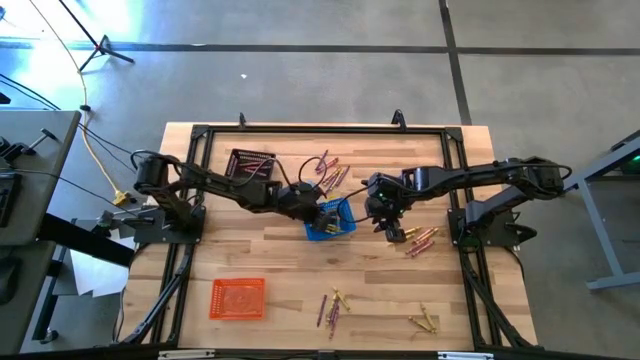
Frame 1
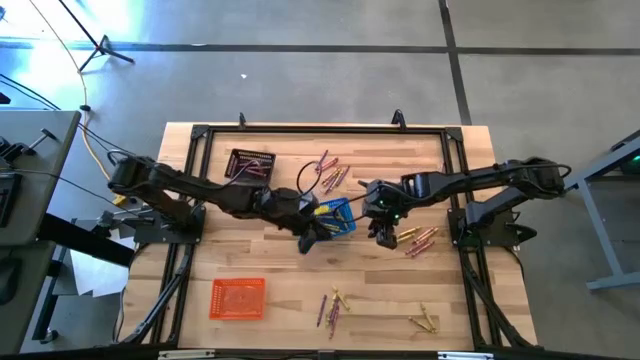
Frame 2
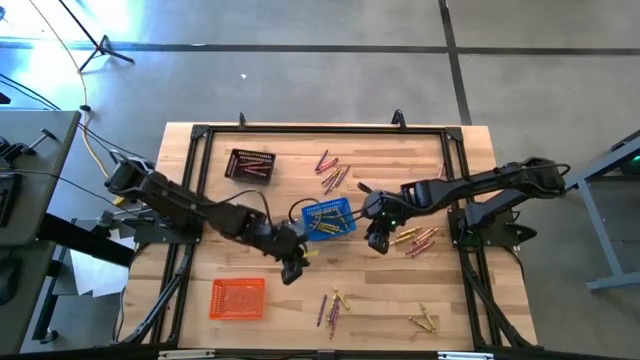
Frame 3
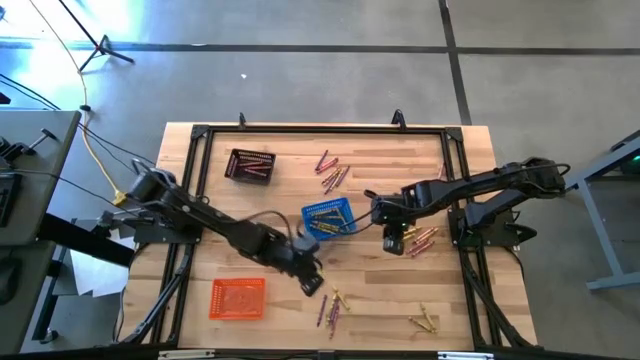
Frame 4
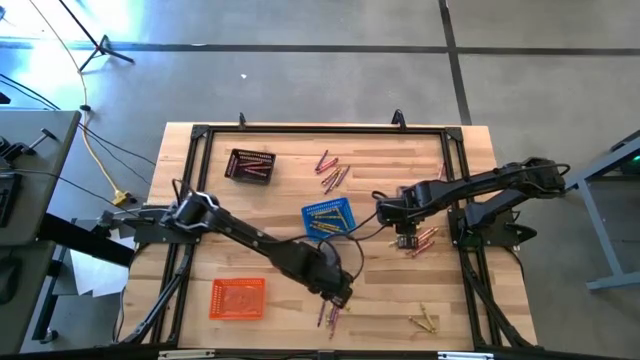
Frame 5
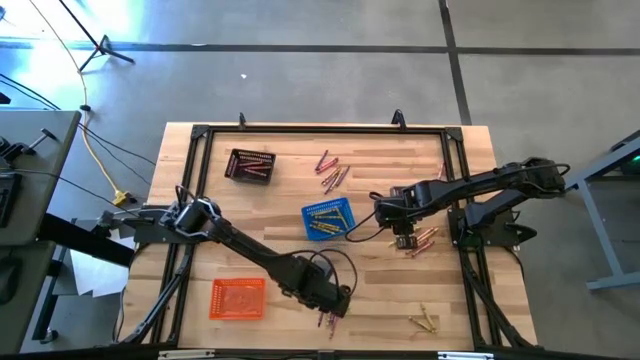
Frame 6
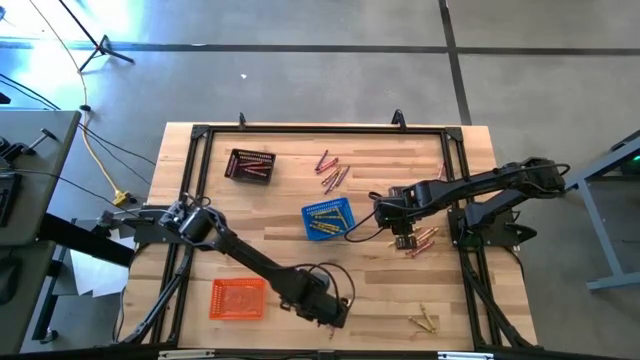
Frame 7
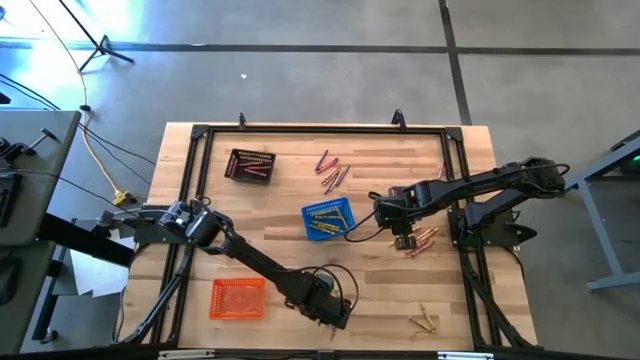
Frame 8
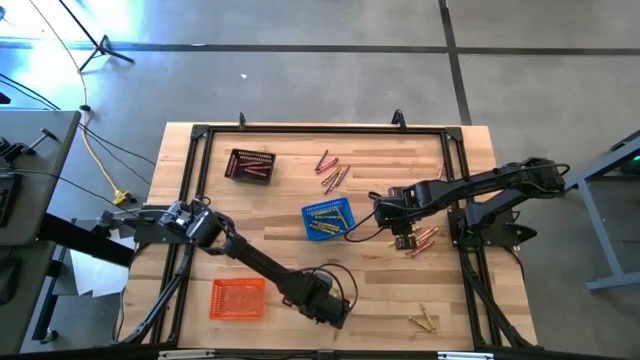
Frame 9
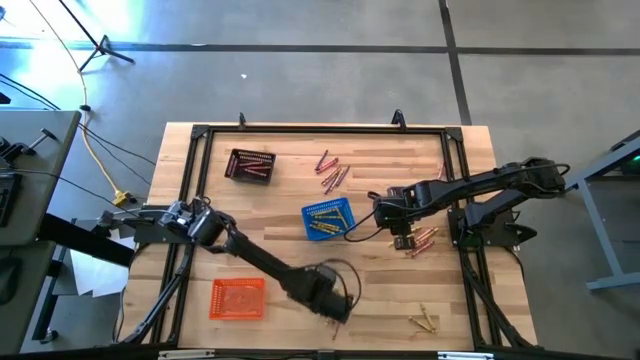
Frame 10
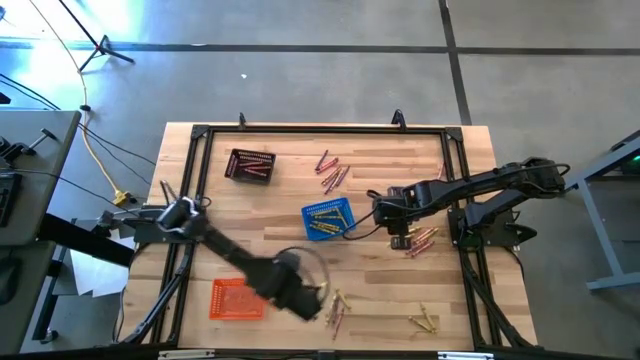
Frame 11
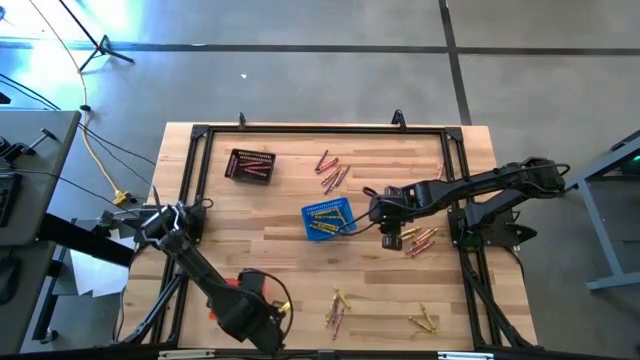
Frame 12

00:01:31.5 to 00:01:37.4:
Task: Sort crayons
Put the violet crayon into the orange basket

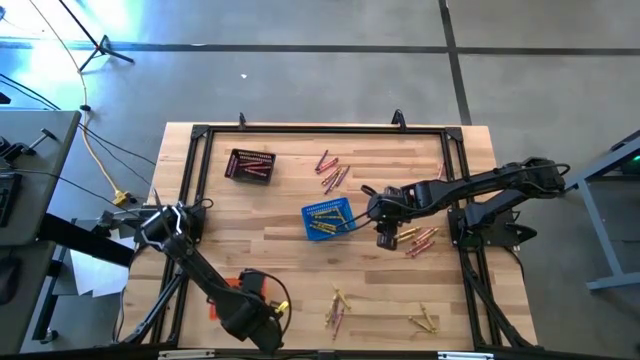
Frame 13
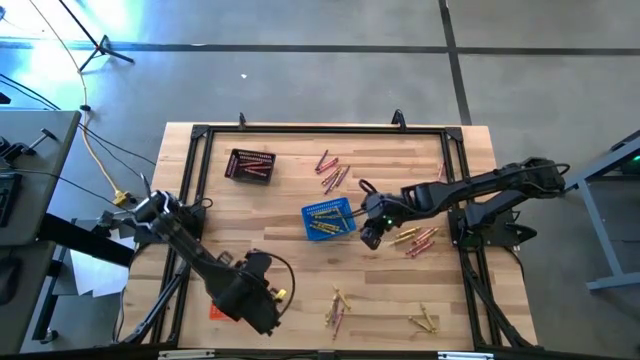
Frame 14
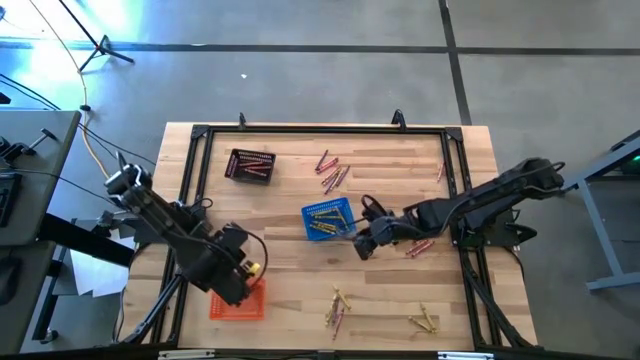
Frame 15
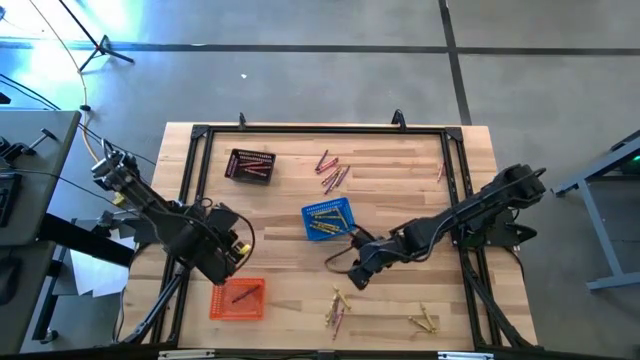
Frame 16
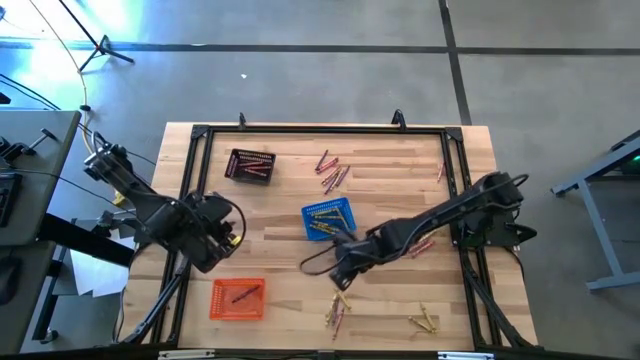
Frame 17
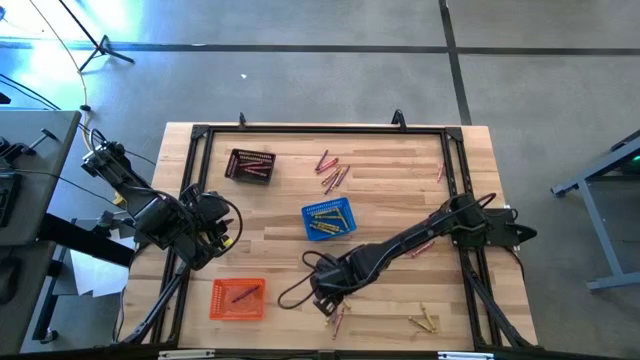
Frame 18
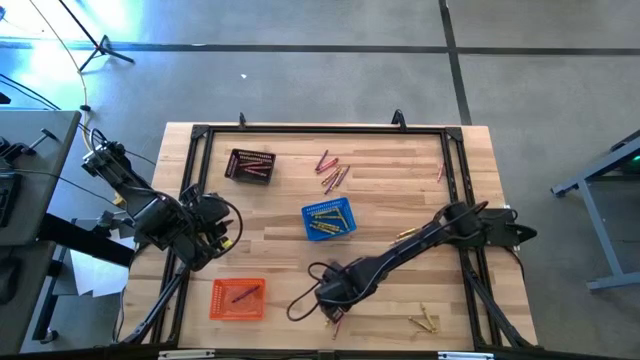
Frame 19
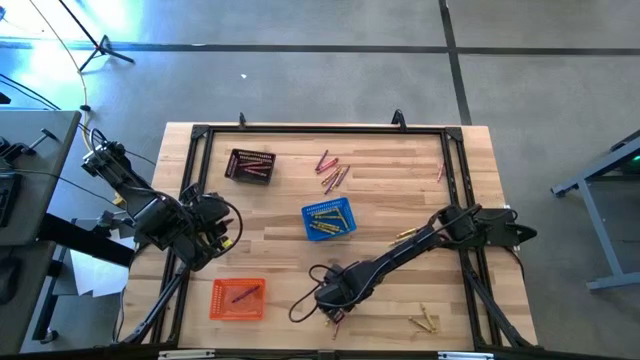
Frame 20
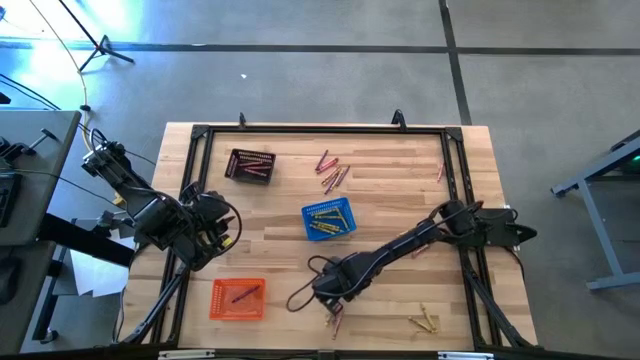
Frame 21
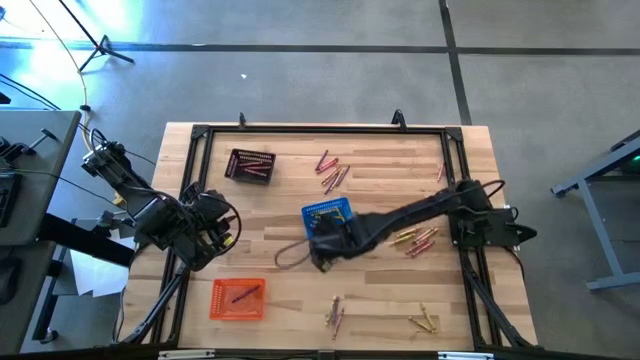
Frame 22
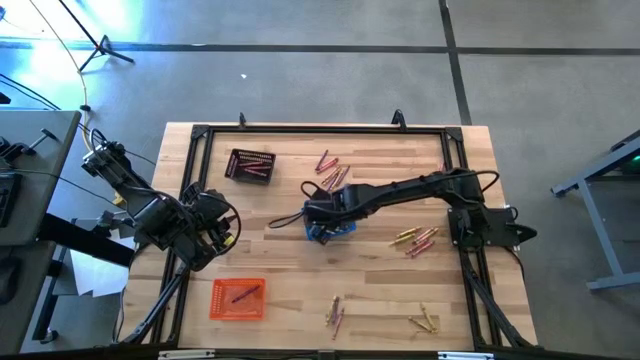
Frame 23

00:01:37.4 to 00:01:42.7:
Put the yellow crayon into the blue basket

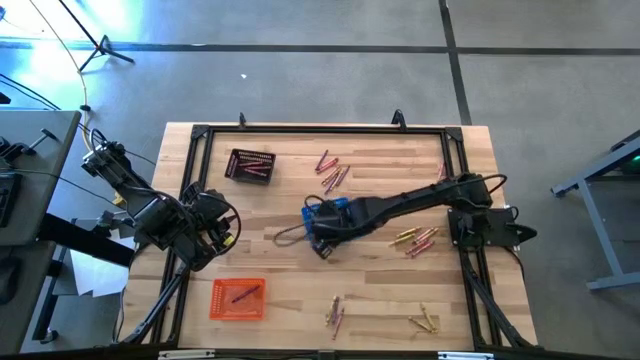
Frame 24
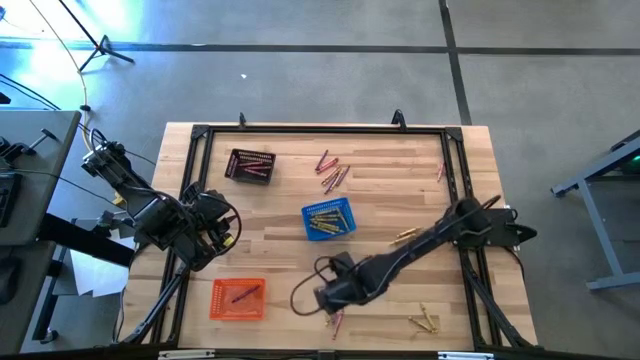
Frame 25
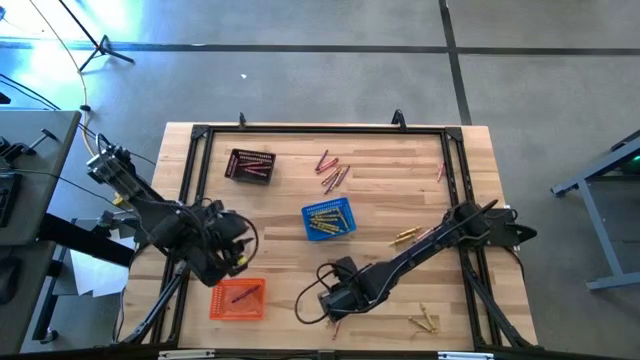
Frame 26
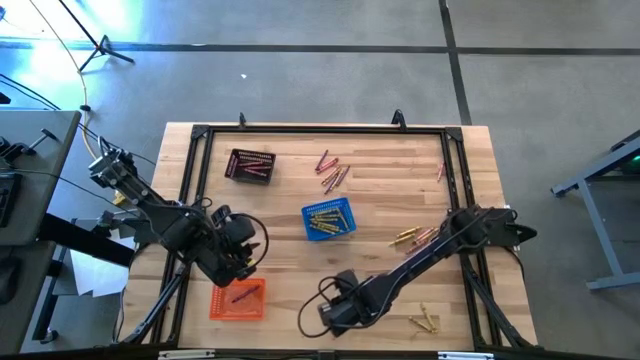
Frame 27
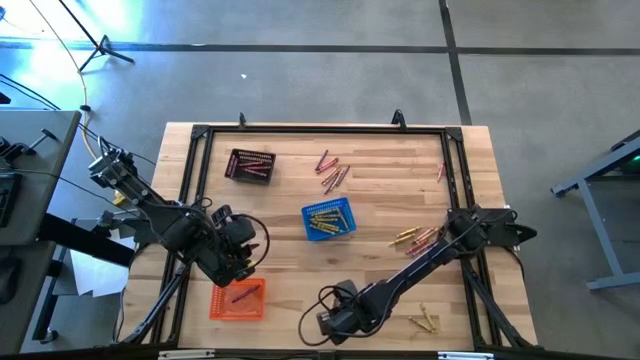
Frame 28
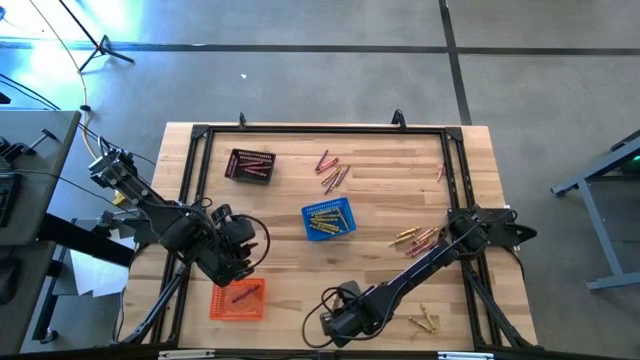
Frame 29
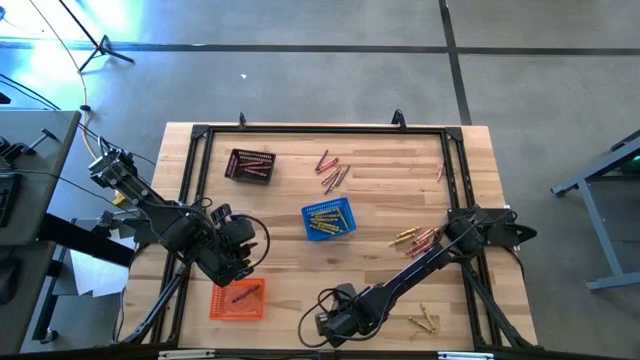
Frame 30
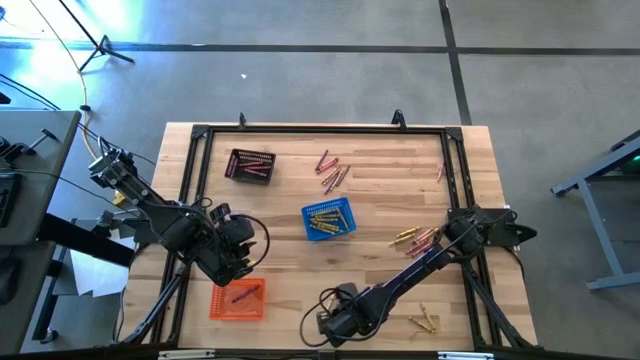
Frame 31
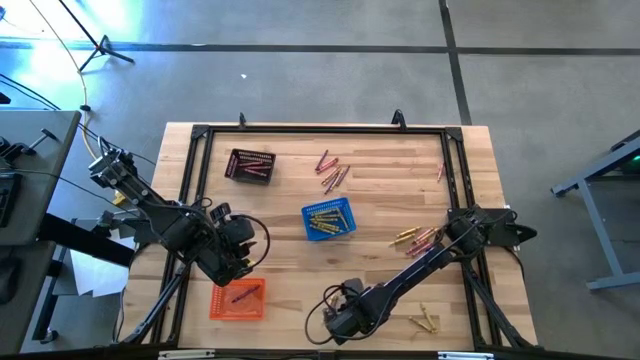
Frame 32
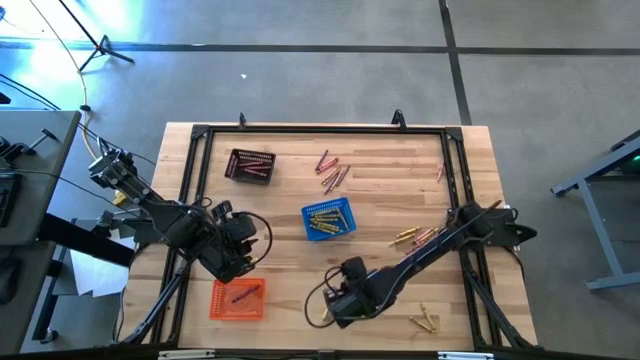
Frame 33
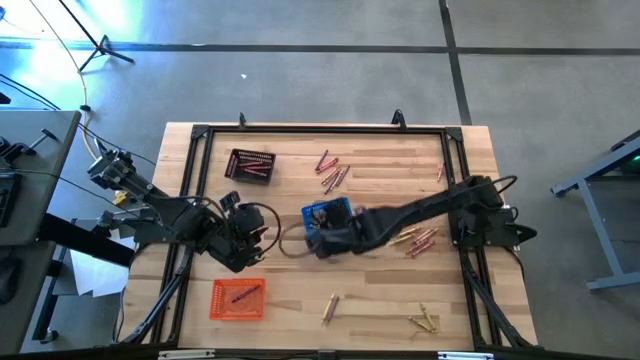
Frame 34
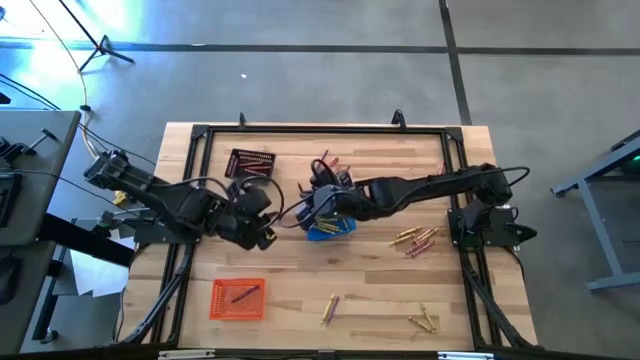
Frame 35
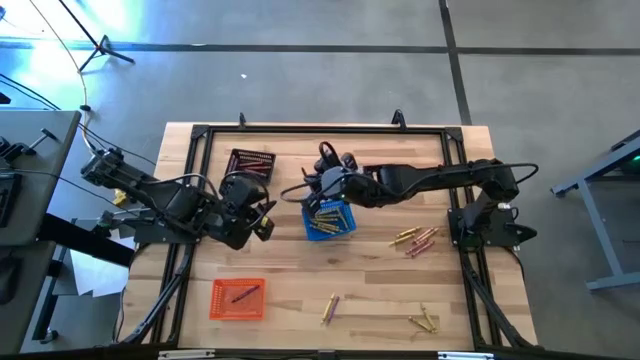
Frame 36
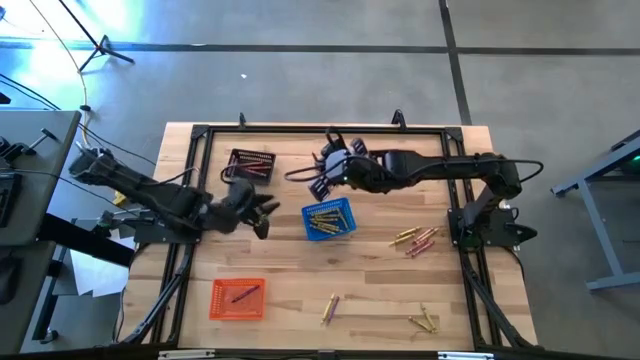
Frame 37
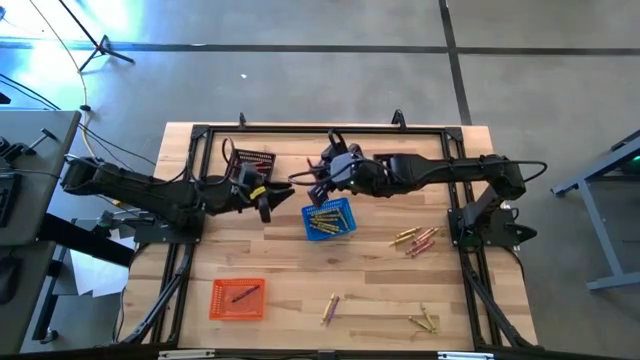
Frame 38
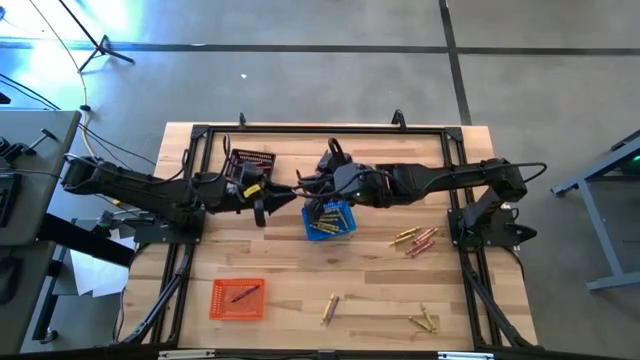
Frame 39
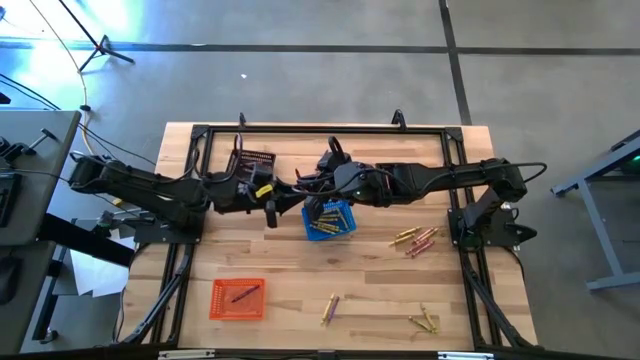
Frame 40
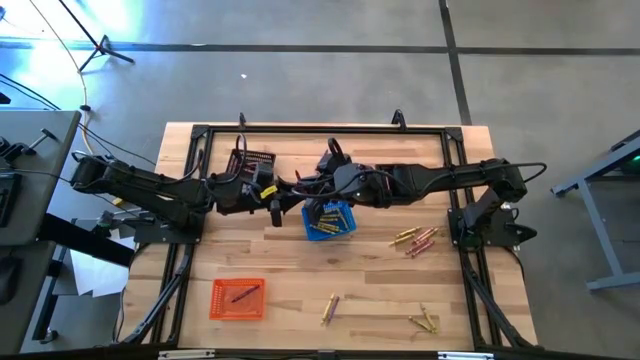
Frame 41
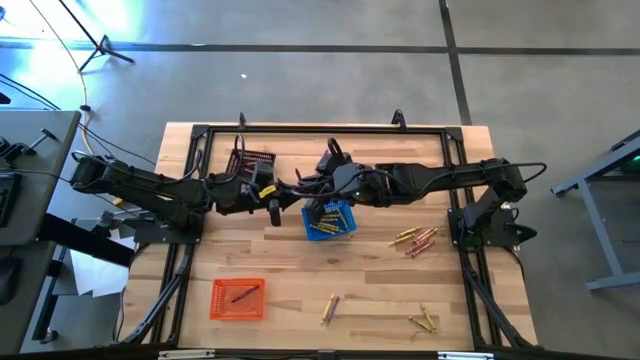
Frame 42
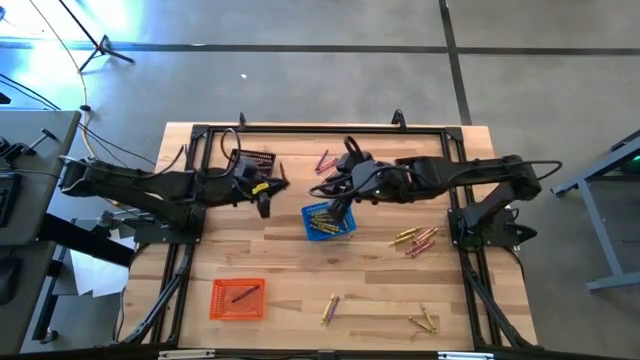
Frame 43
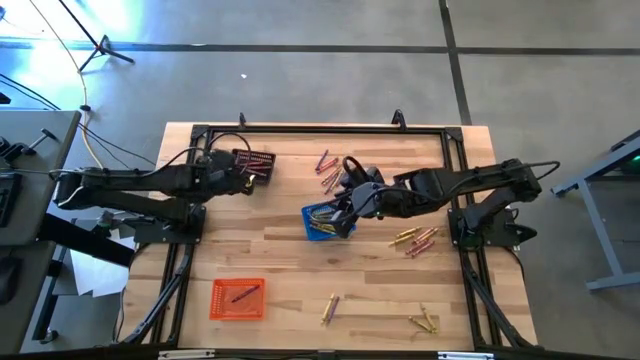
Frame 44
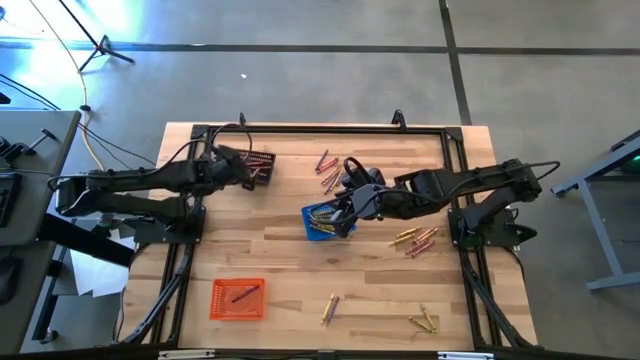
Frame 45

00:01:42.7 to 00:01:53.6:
Put the red crayon into the black basket
